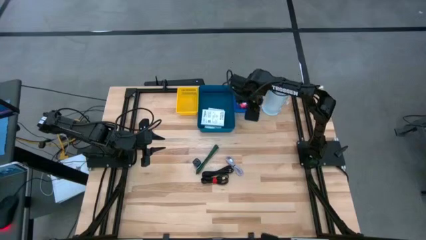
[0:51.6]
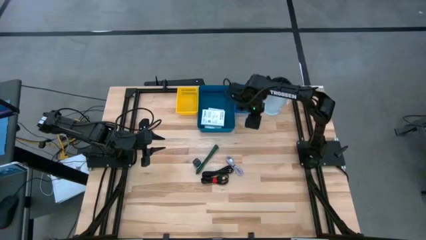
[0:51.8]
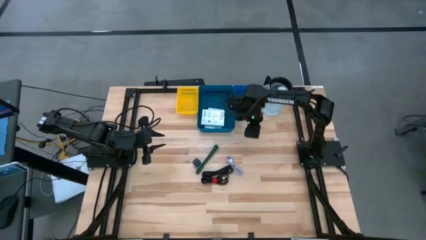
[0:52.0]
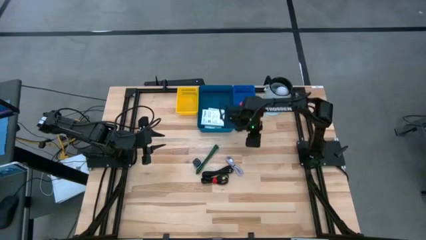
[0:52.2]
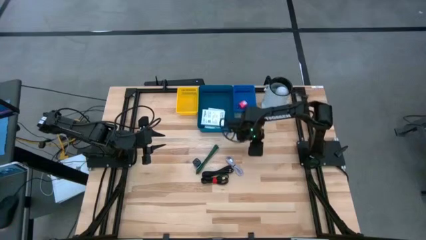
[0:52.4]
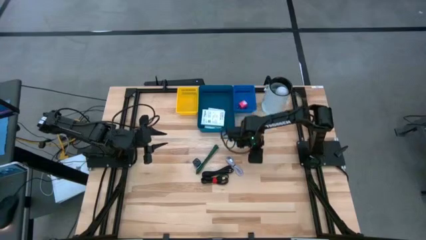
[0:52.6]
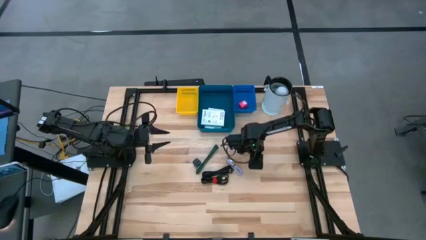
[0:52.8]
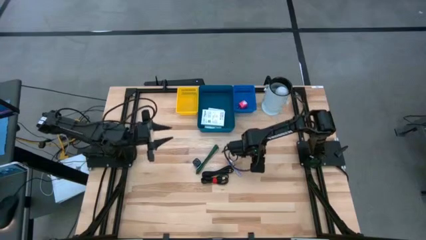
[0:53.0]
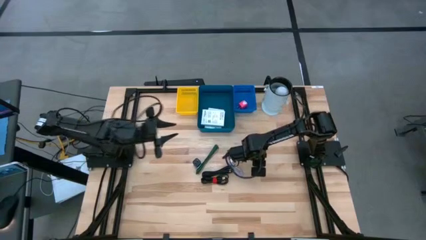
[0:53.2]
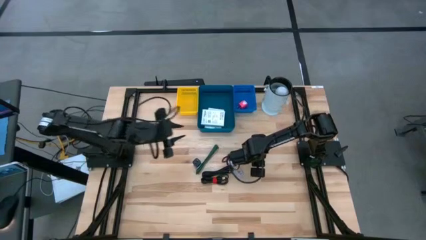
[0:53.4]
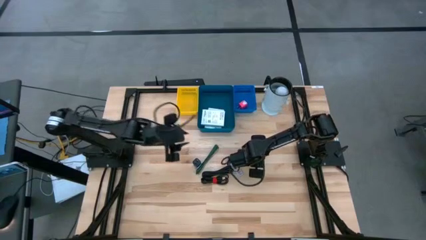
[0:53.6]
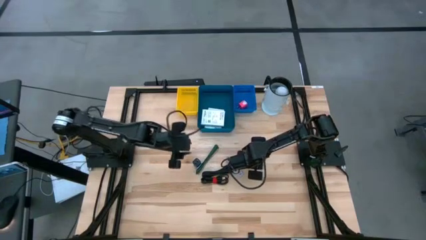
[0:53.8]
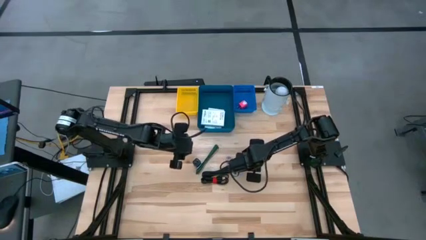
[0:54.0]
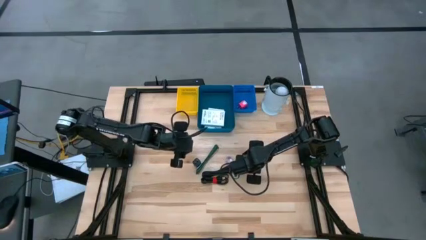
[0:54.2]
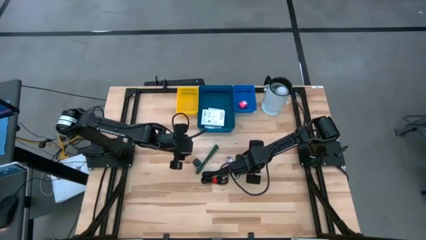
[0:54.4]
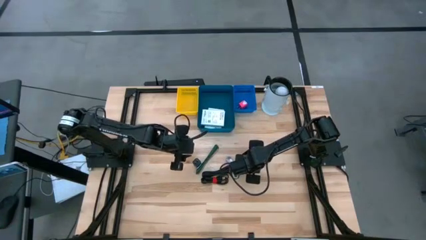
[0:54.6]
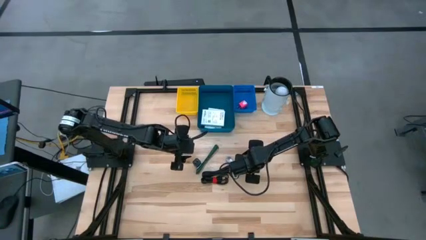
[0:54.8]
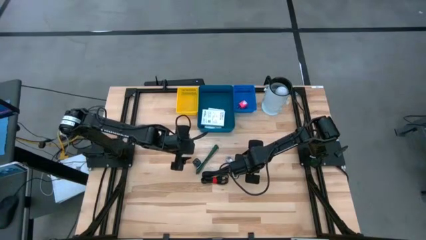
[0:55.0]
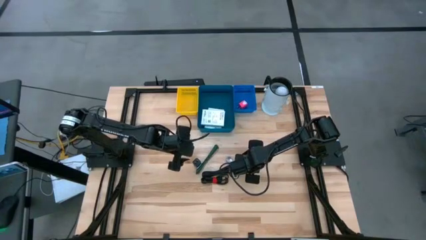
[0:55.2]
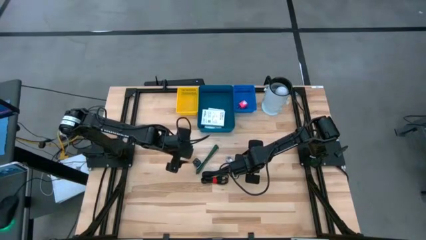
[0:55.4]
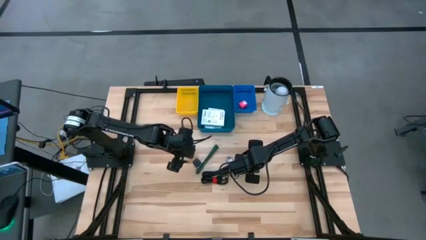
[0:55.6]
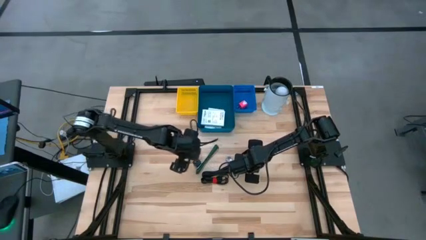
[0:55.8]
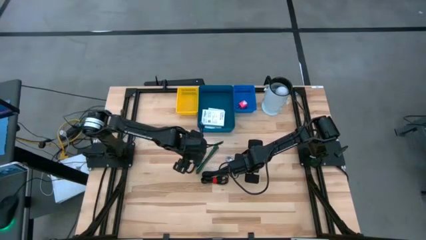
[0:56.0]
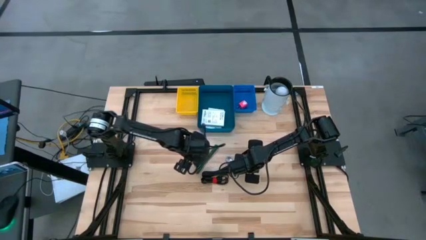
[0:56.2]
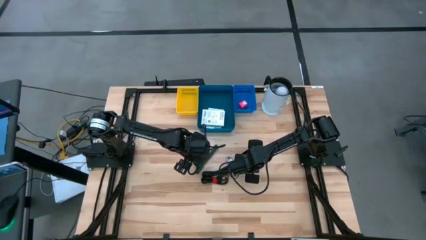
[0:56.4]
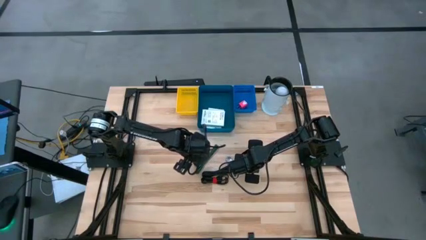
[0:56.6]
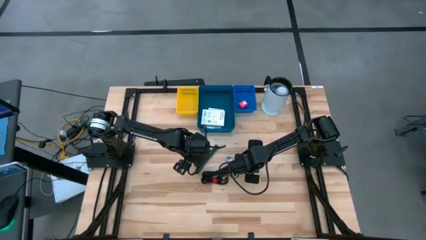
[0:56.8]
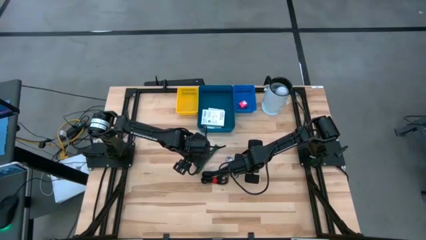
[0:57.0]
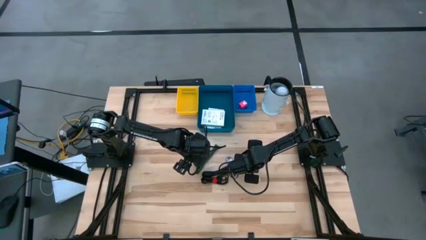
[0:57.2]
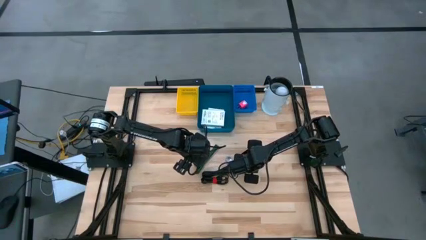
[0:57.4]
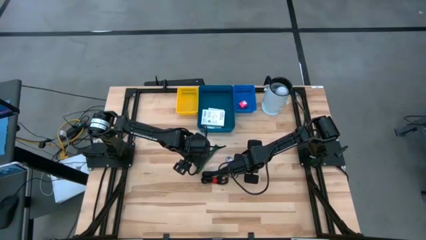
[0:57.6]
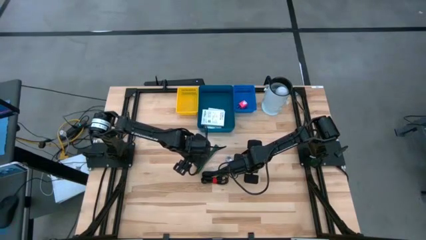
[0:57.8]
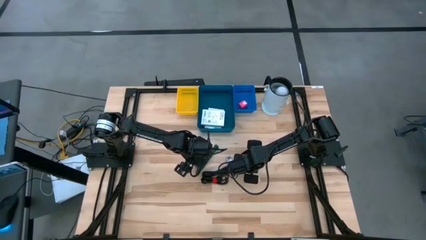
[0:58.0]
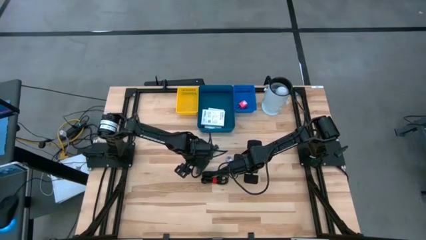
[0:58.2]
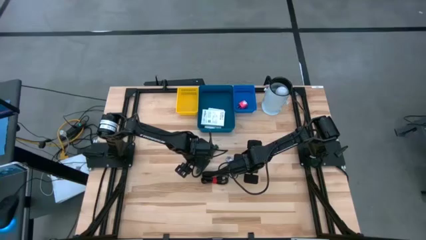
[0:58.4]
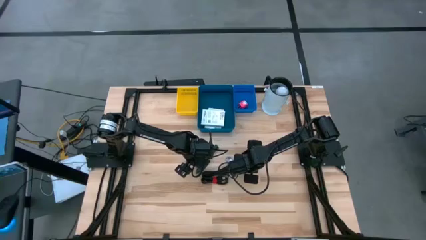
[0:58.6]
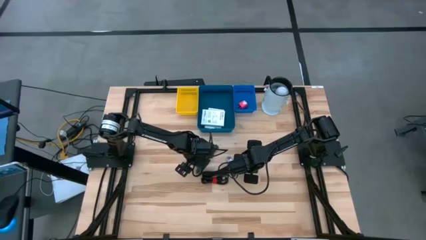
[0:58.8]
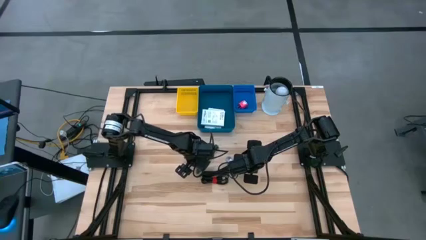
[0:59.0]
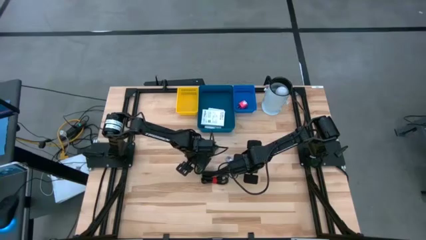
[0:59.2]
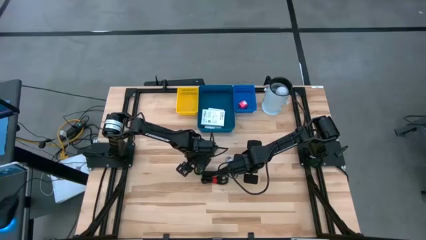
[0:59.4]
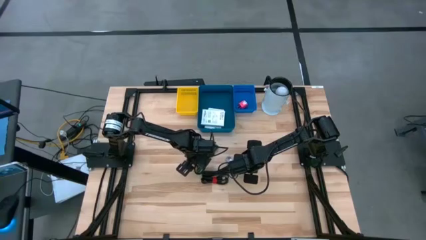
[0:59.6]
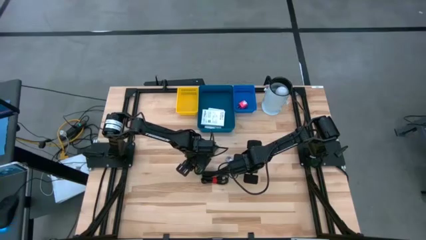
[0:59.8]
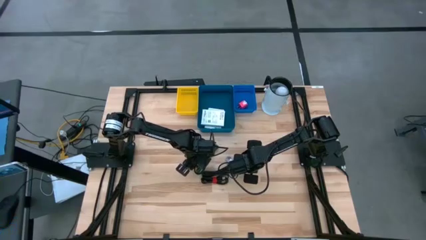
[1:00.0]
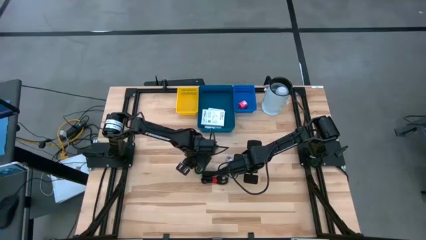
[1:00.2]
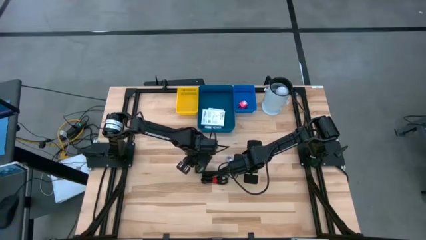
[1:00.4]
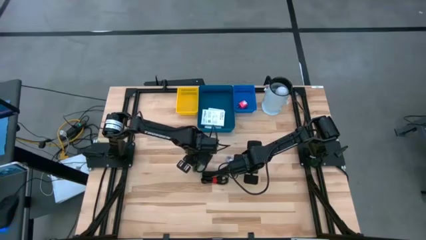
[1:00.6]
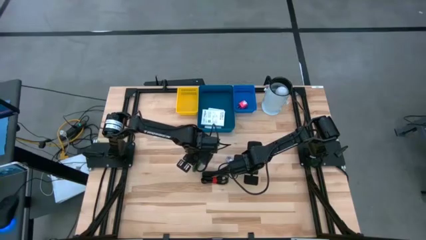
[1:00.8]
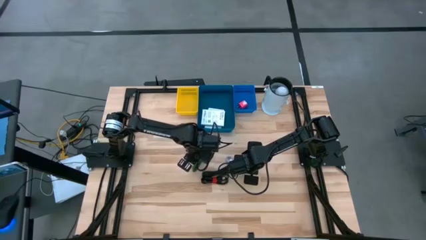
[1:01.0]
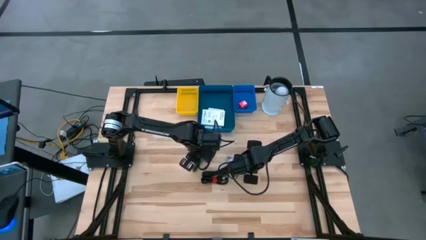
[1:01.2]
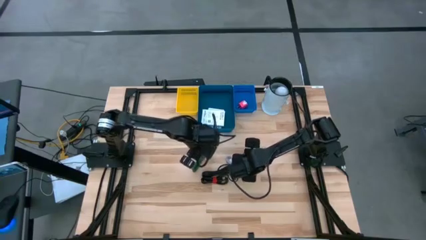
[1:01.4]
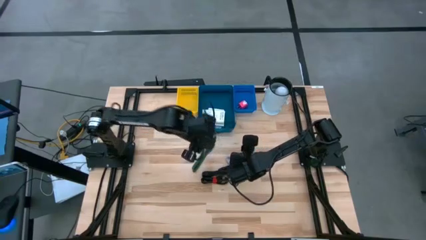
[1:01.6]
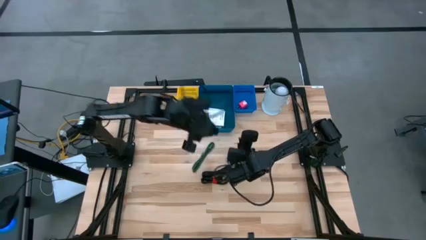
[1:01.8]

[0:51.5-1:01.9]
Task: Pick and place items into bin
Put the black charger adapter into the blue bin
